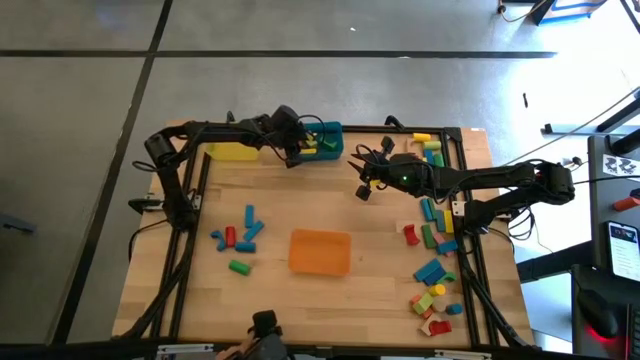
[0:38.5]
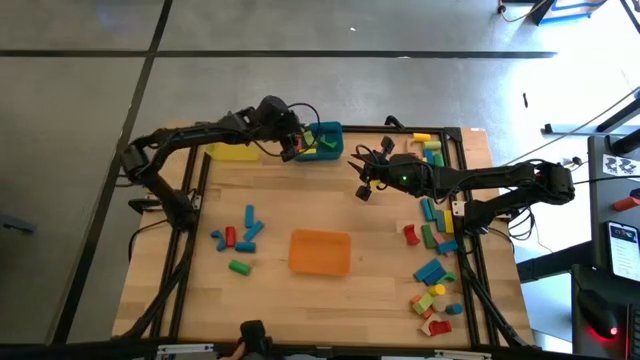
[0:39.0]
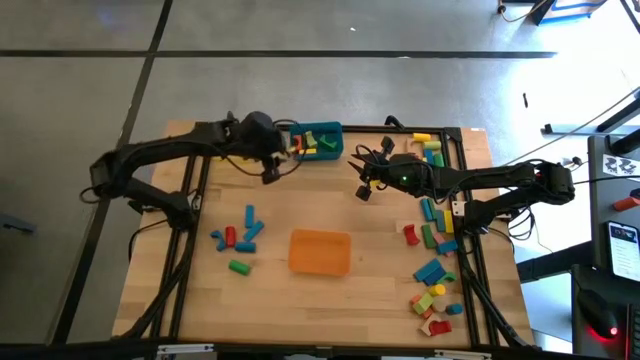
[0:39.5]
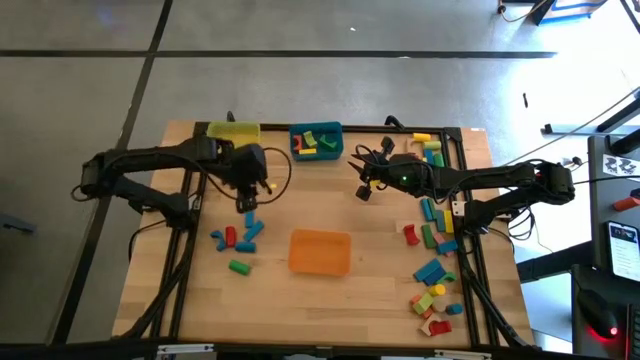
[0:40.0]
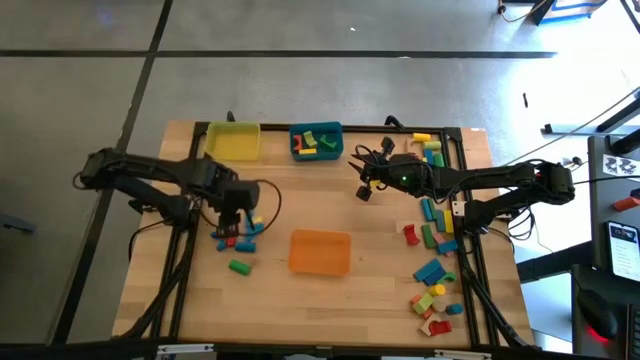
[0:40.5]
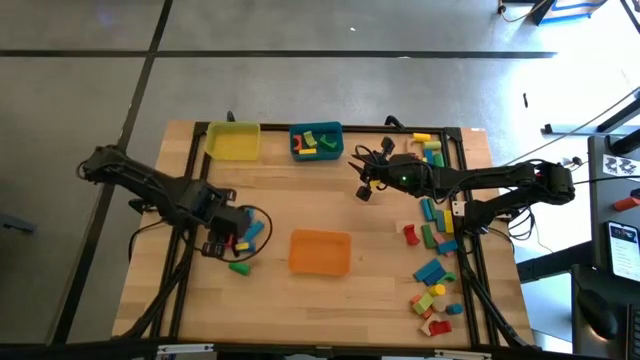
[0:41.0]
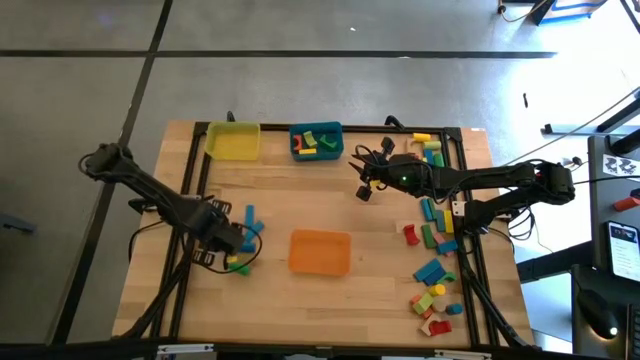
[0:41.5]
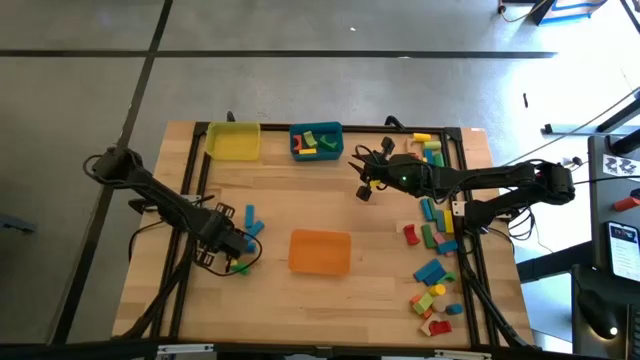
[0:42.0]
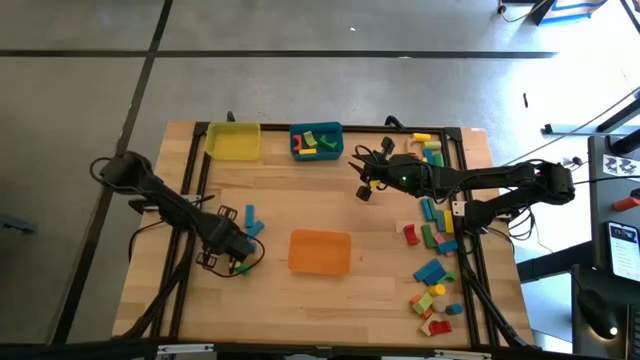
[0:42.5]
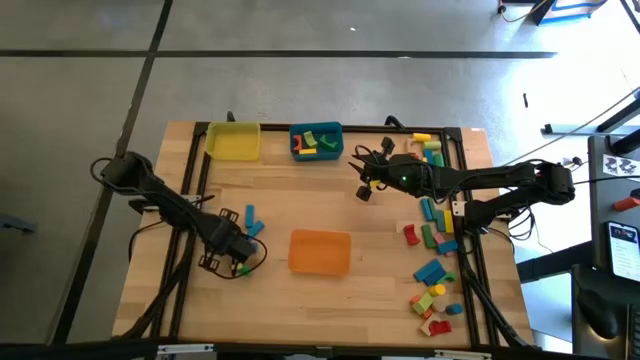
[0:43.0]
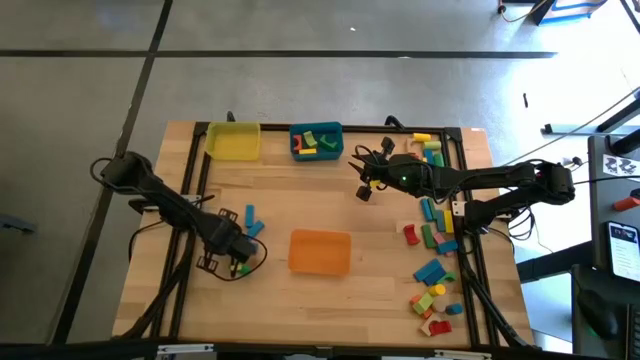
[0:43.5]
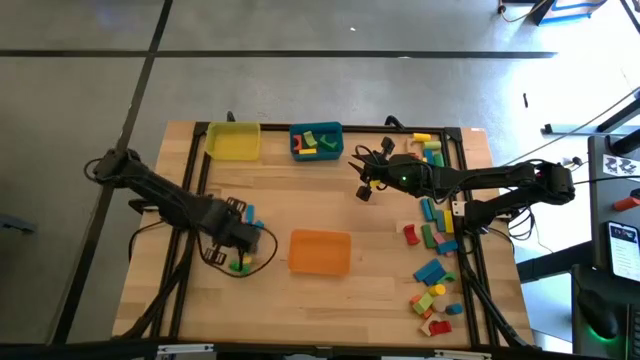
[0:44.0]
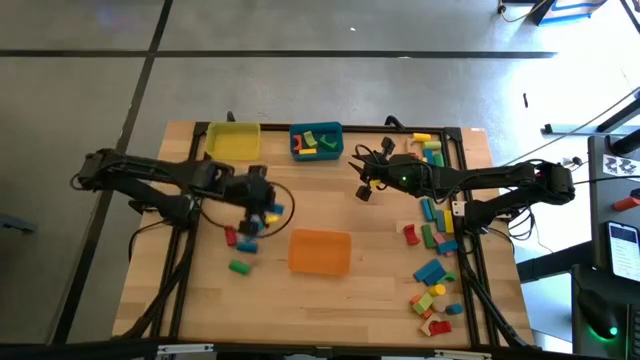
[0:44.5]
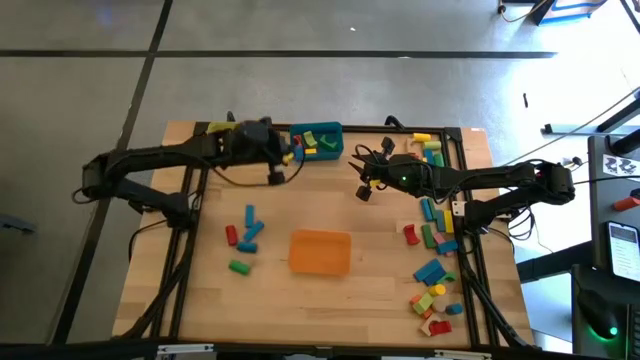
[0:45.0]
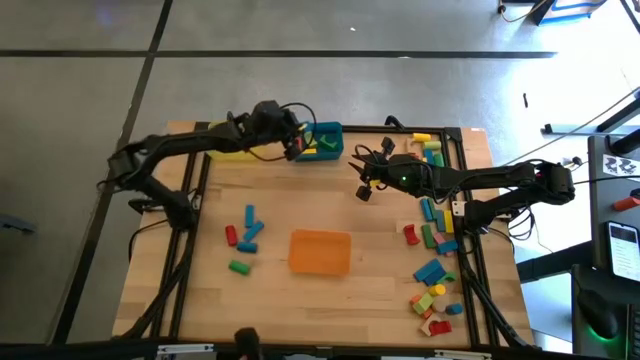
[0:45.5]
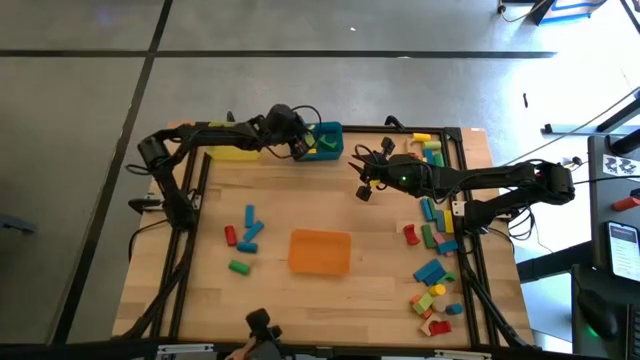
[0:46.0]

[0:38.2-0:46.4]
Task: Sort blocks by size
Put the blue arch block into the blue bin

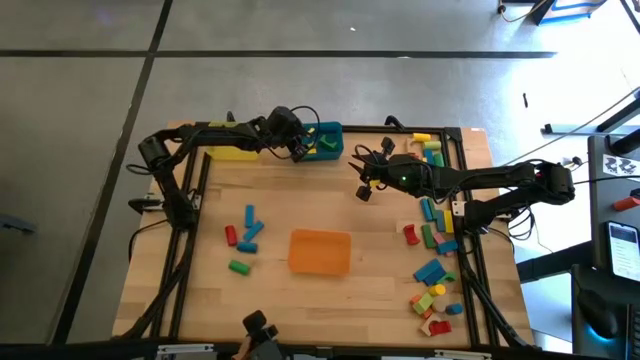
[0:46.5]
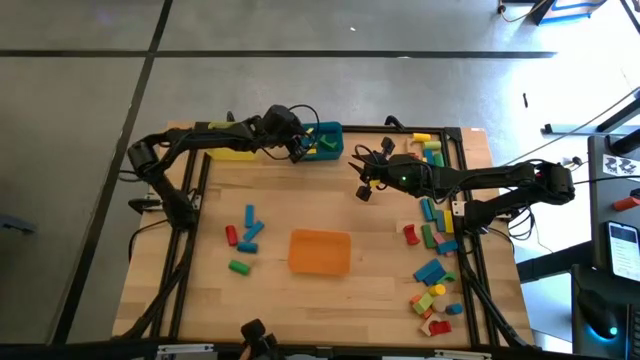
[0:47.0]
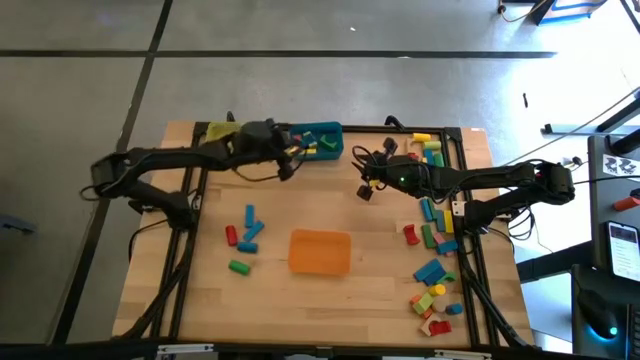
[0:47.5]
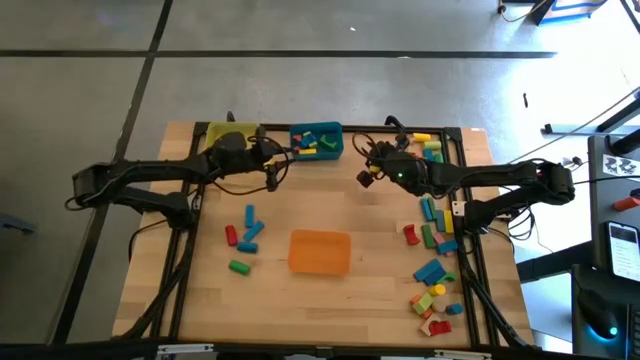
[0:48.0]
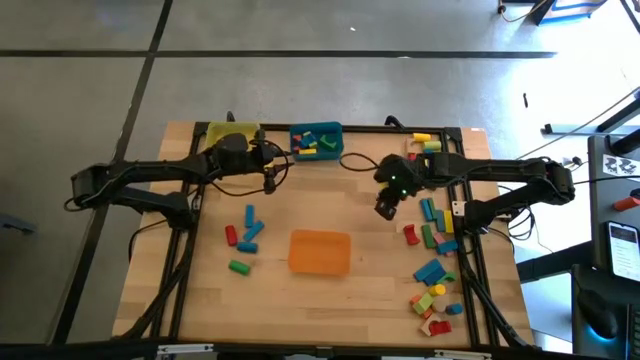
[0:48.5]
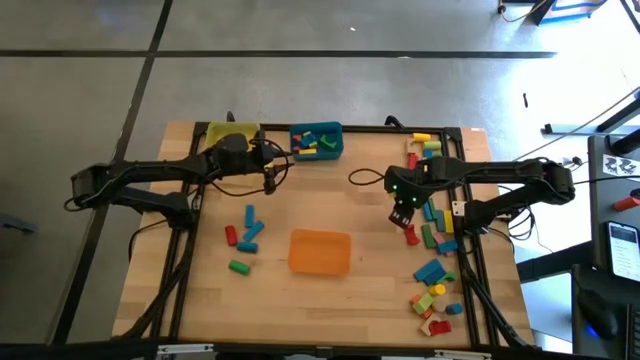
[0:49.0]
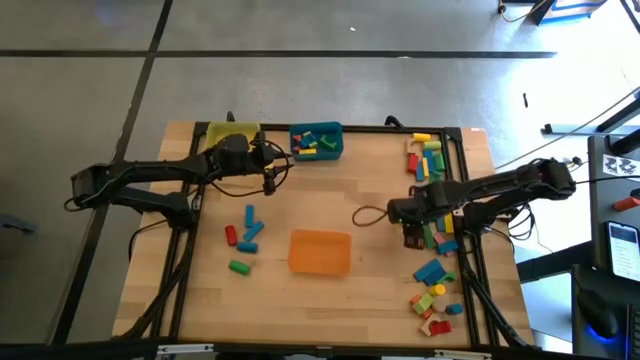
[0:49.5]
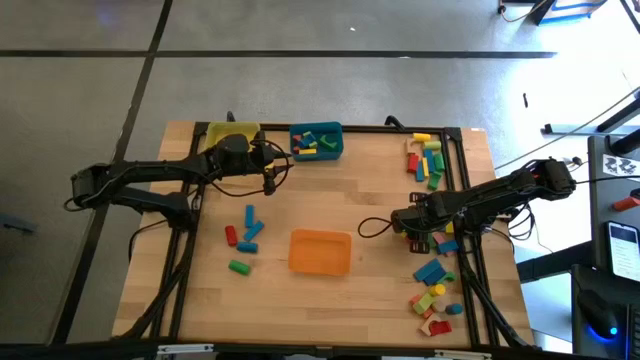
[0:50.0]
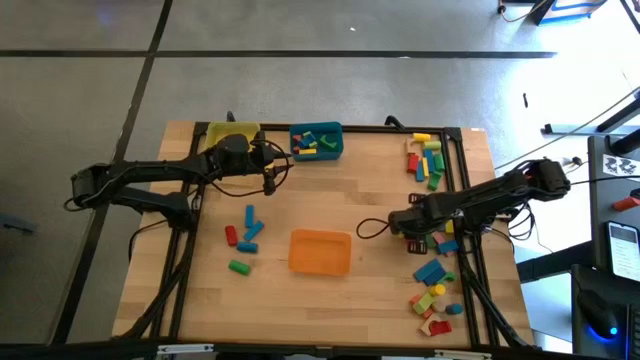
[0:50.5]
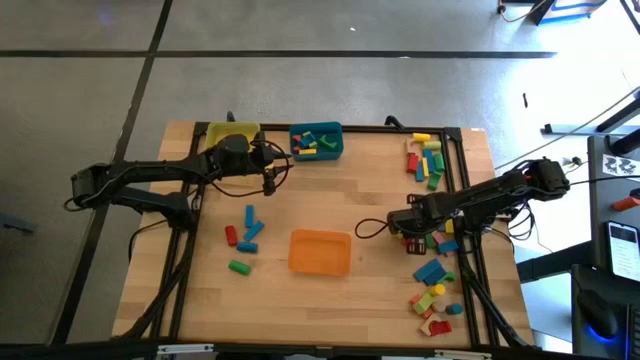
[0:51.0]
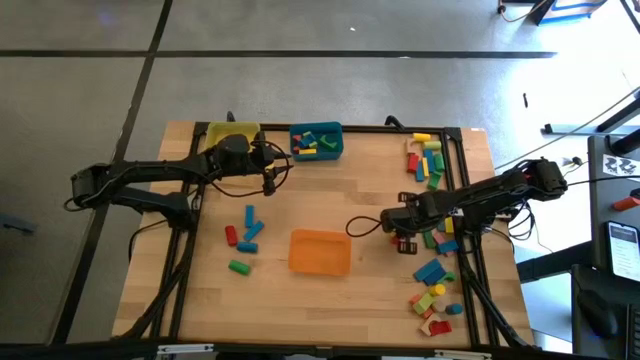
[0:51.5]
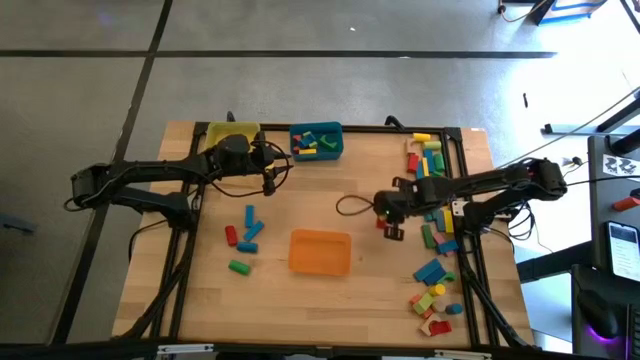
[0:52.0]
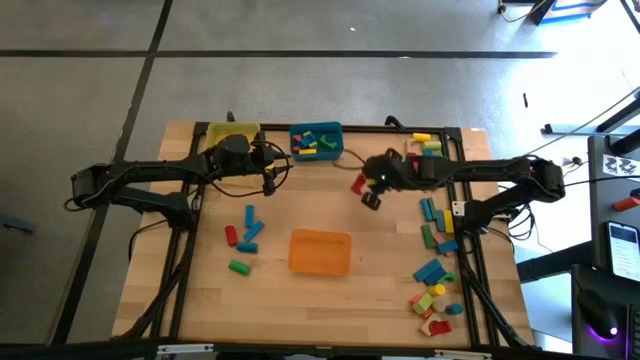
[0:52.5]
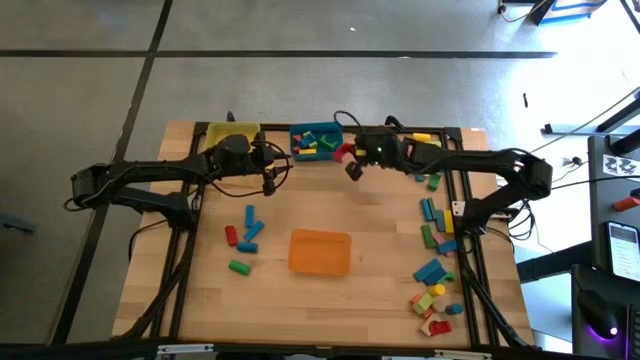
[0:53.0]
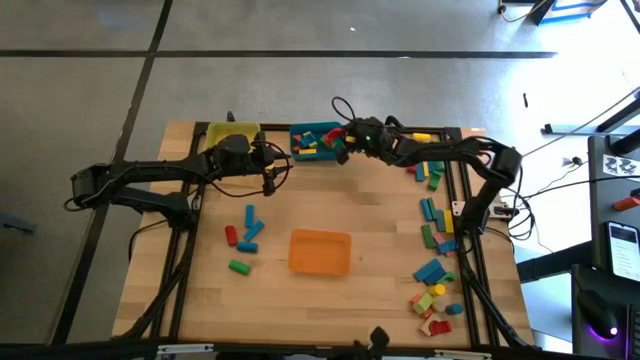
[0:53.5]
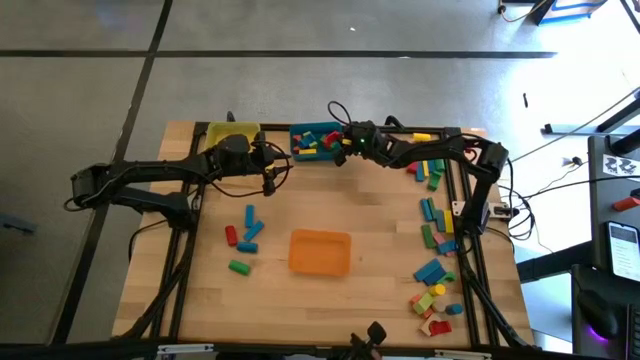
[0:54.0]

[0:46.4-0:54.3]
Put the red arch block into the blue bin

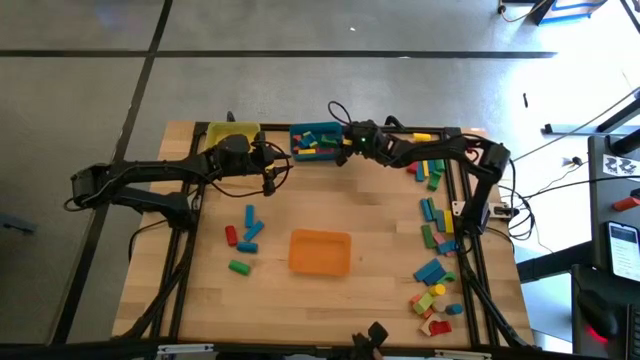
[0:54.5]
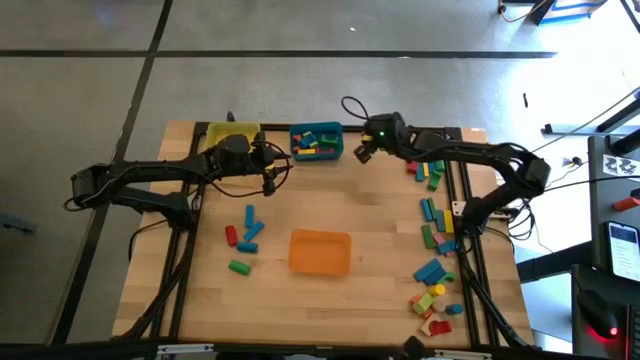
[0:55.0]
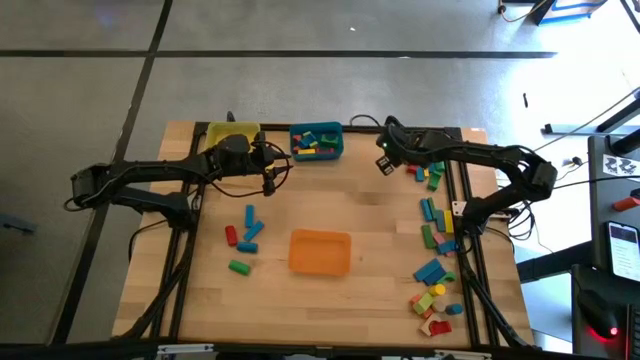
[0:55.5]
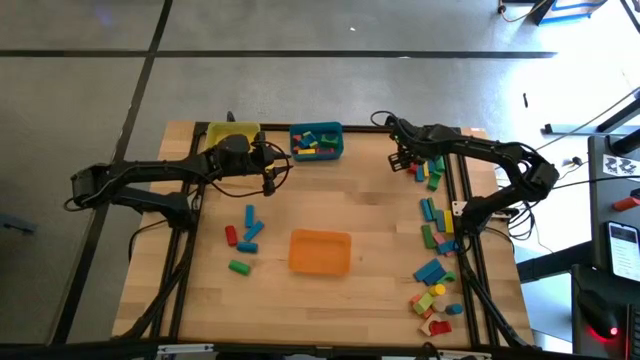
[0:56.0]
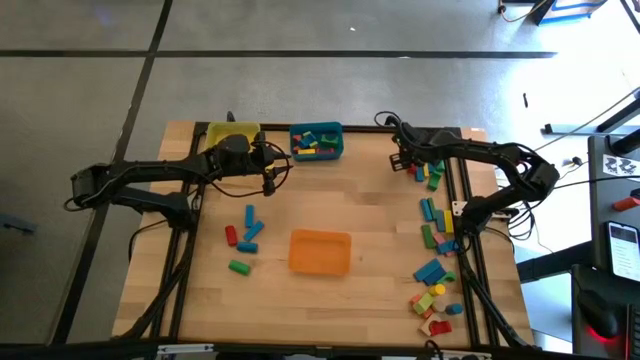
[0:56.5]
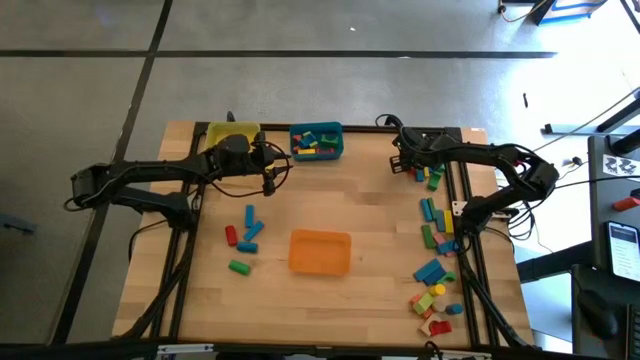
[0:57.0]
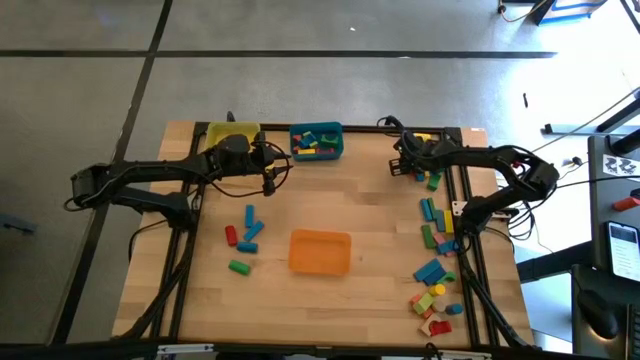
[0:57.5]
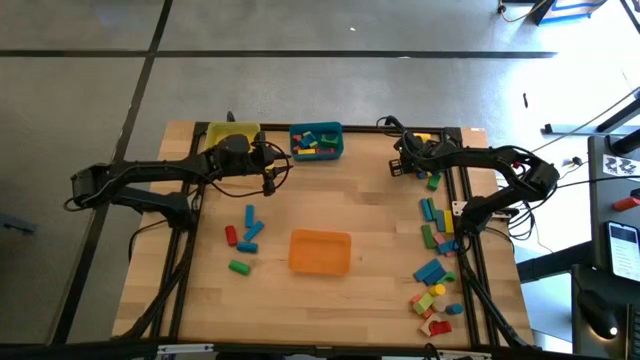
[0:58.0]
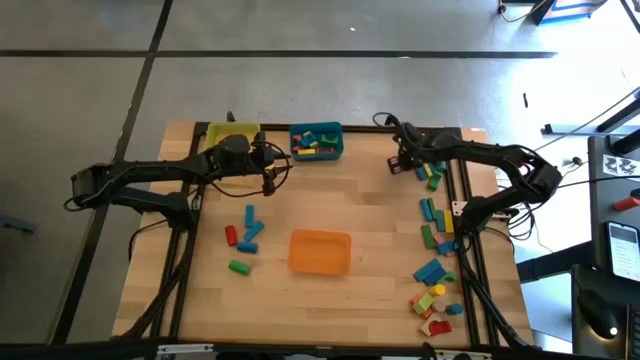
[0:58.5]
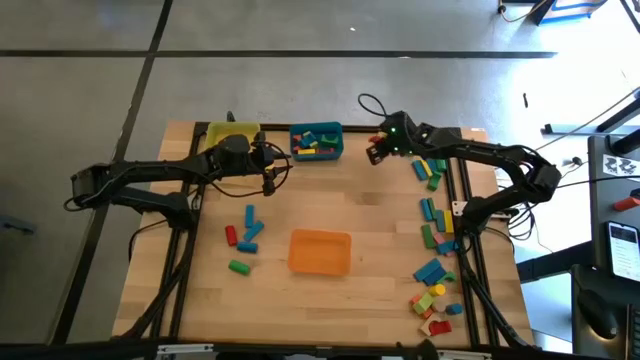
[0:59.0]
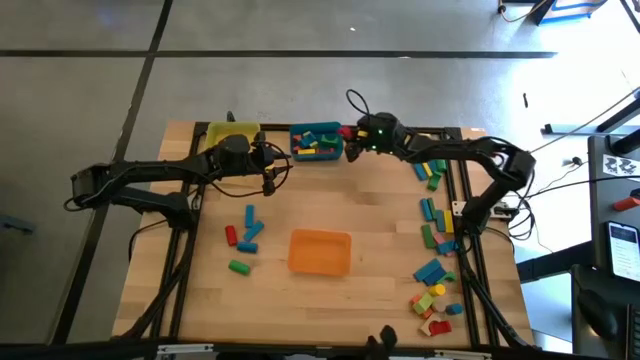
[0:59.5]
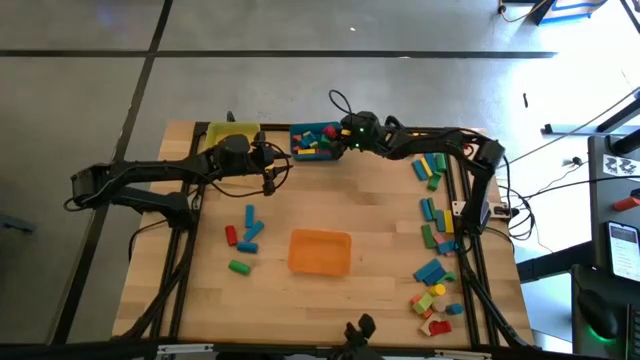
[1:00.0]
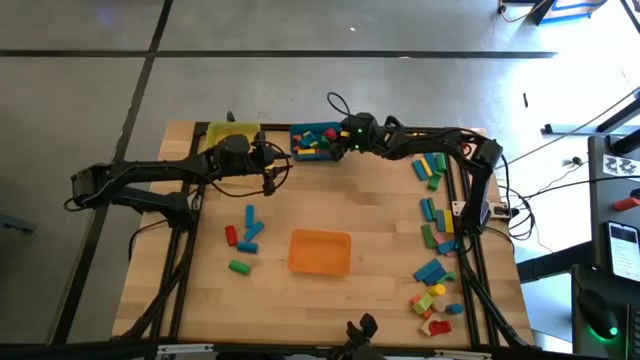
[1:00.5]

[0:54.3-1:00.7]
Put the red arch block into the blue bin
